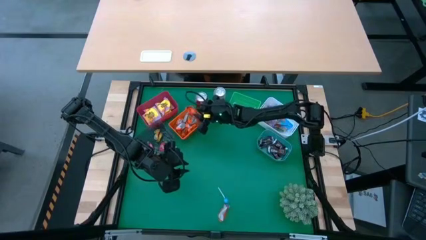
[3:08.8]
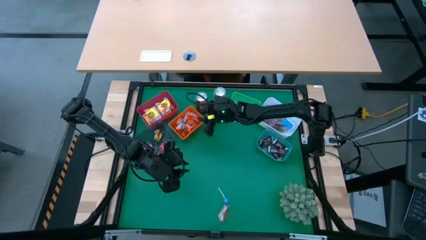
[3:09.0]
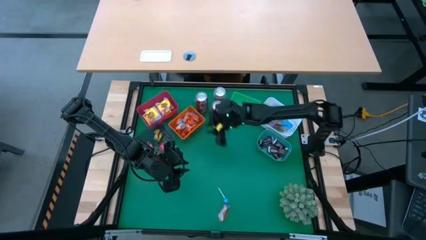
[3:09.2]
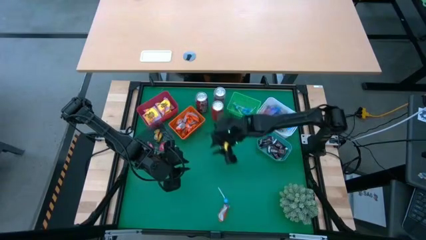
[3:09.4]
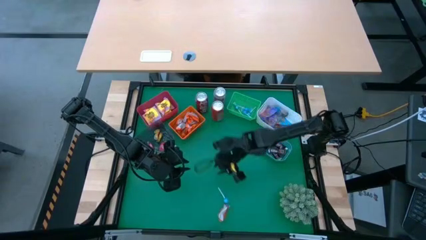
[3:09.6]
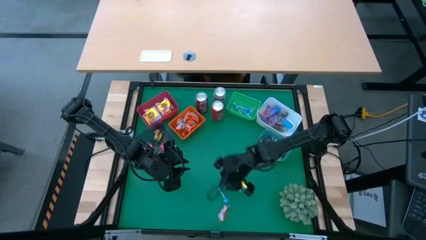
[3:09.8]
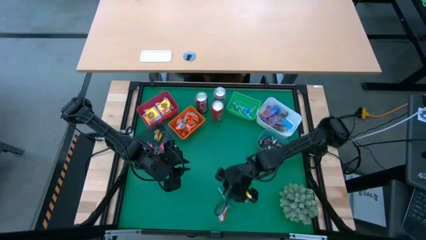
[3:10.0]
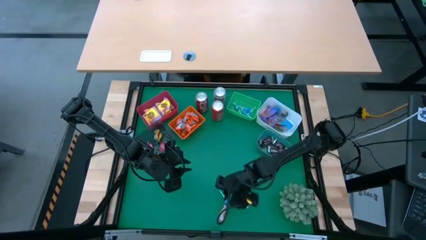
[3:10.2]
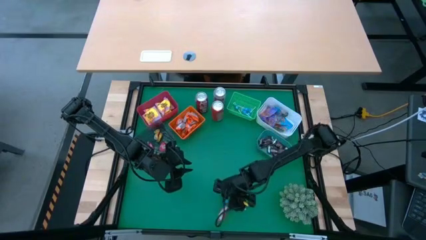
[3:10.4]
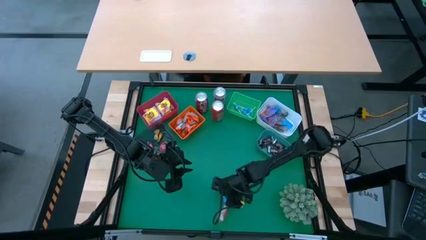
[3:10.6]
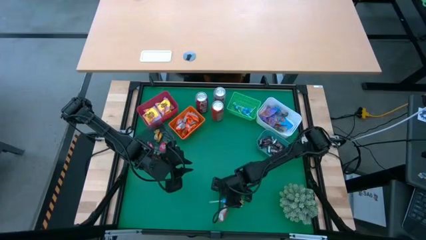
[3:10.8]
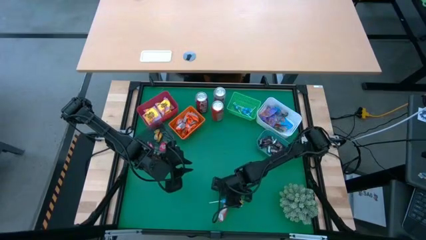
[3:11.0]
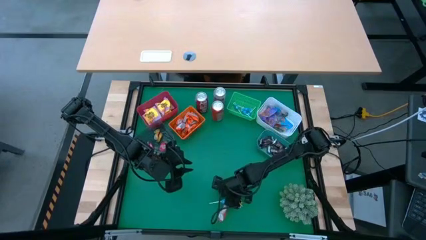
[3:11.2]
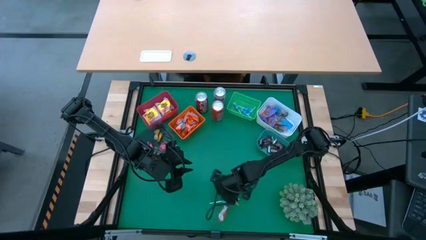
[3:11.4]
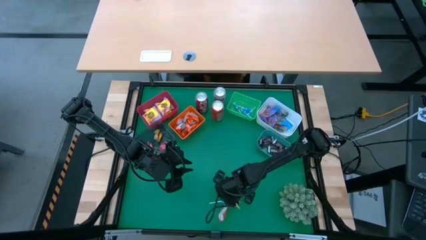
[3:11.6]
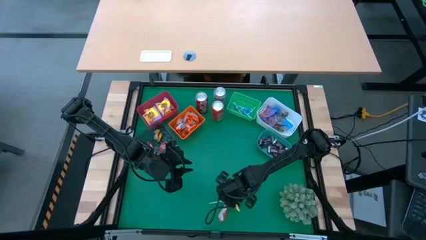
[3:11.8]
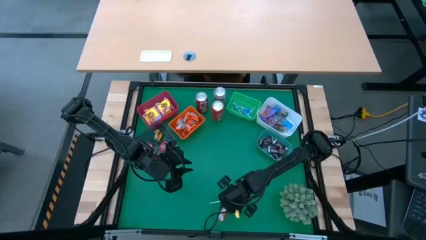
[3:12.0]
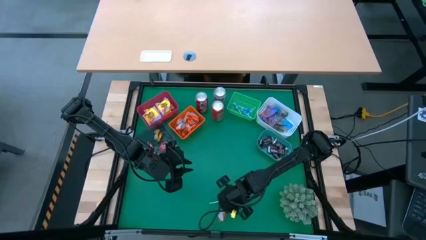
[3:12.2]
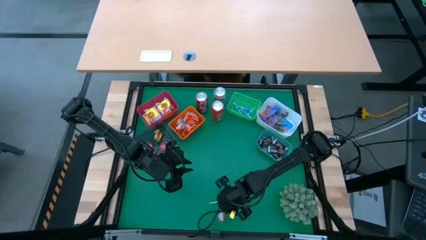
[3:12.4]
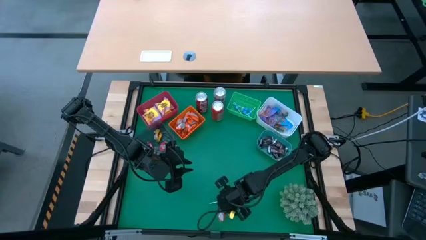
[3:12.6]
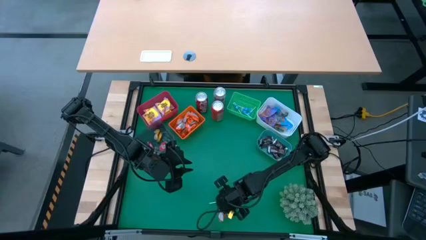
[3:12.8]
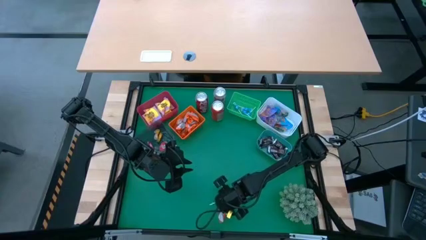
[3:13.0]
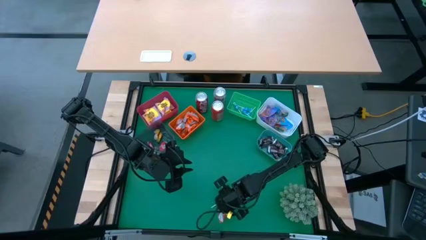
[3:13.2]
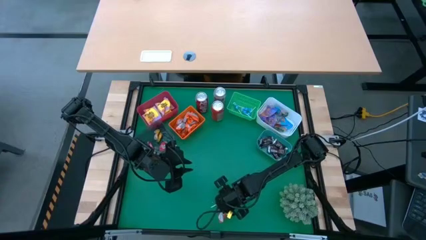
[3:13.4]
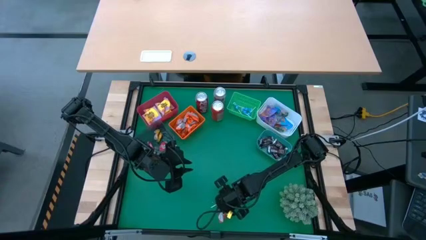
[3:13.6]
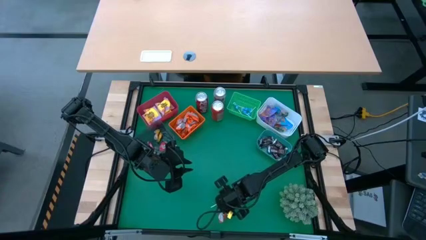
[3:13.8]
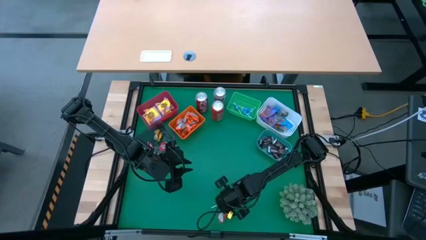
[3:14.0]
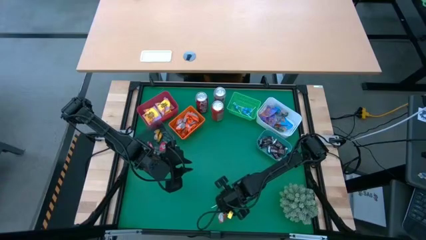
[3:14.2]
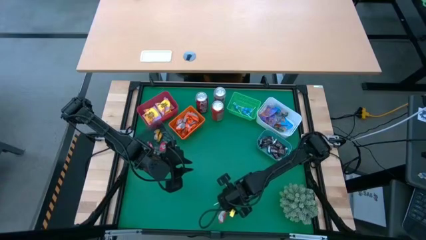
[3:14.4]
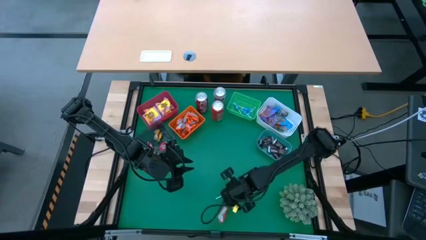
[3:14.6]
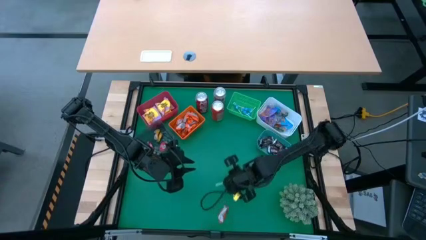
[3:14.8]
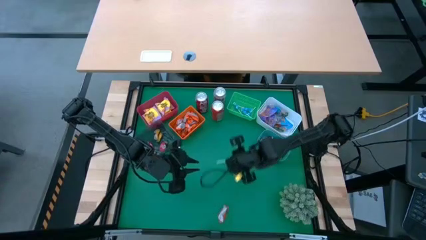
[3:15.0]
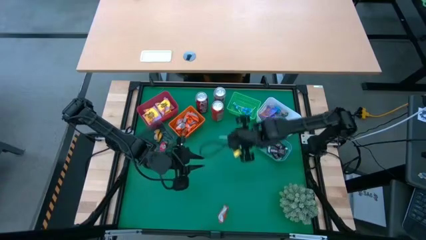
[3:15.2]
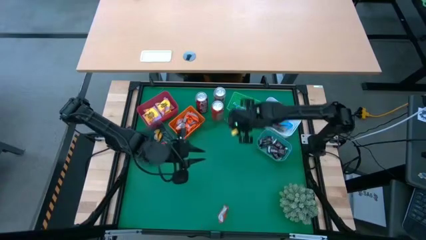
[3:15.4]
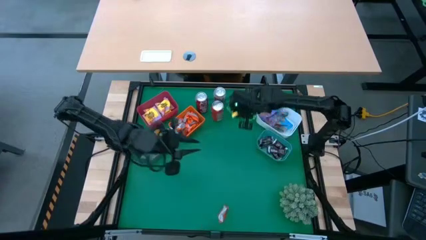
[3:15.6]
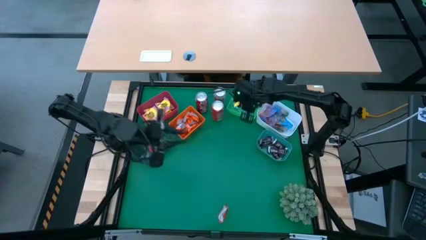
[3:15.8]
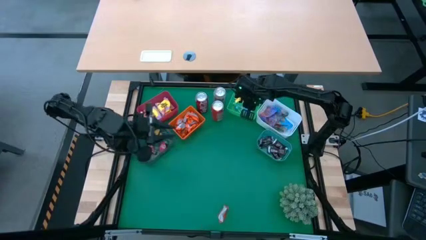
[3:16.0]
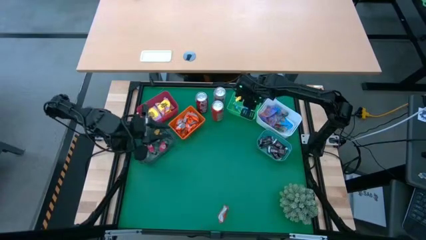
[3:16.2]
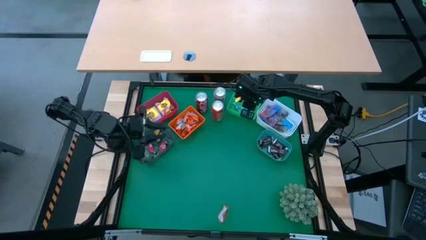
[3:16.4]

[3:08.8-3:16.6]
Task: Sort candy
Put the blue candy into the green bin

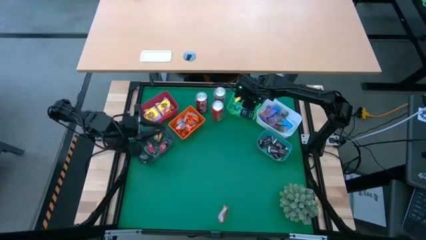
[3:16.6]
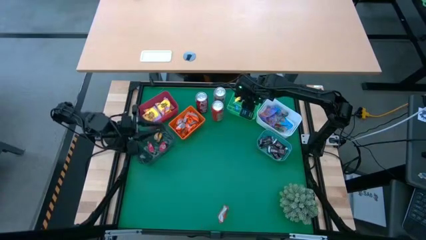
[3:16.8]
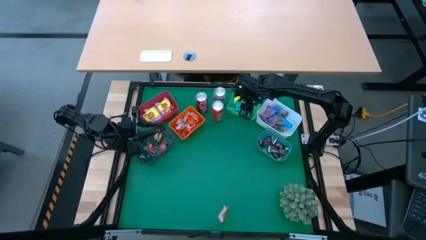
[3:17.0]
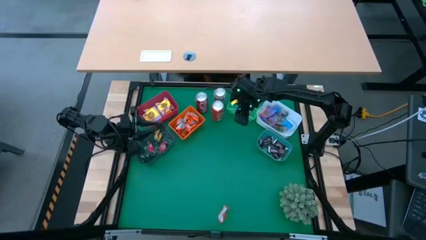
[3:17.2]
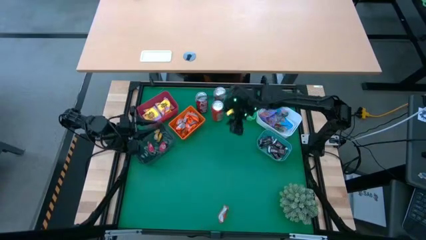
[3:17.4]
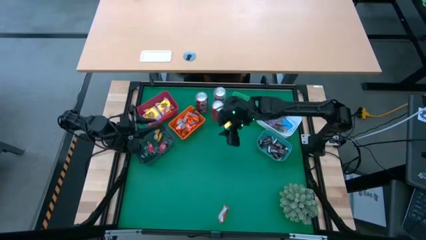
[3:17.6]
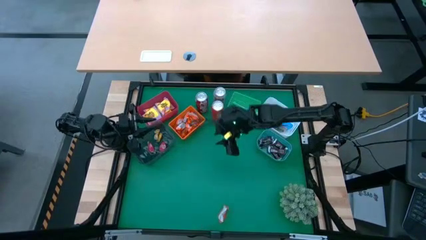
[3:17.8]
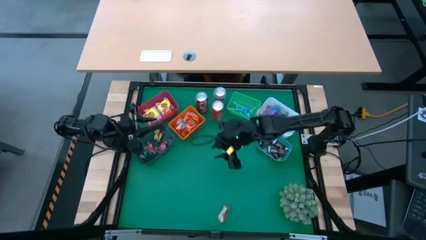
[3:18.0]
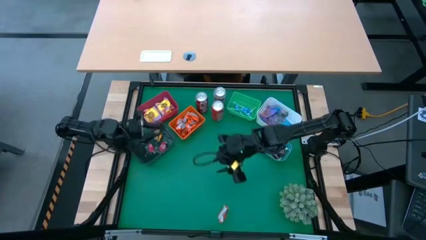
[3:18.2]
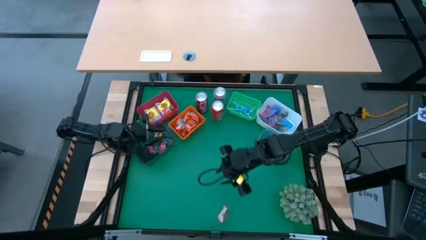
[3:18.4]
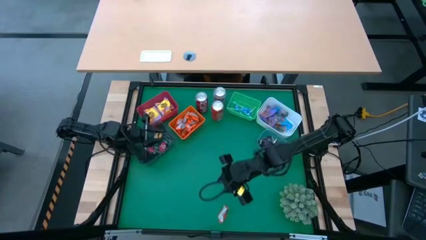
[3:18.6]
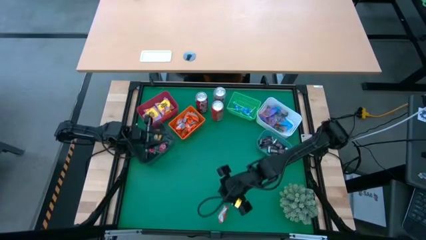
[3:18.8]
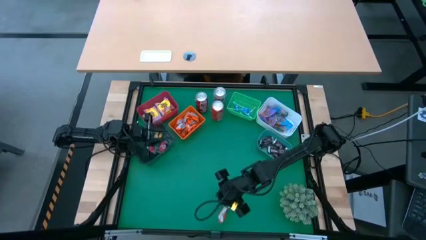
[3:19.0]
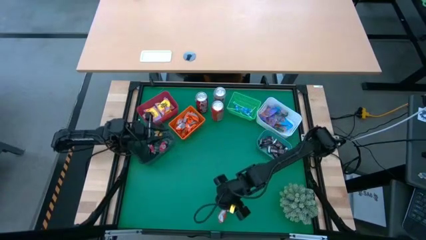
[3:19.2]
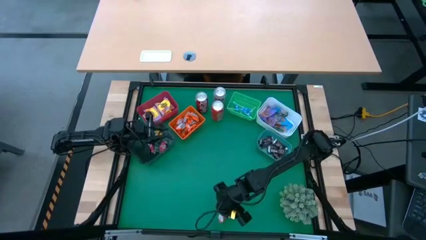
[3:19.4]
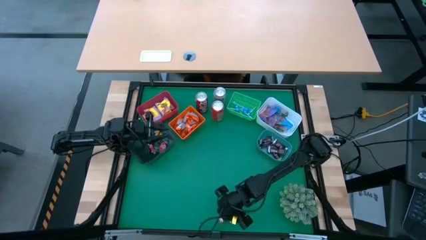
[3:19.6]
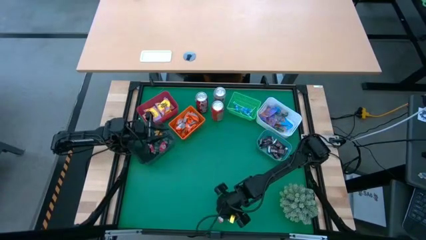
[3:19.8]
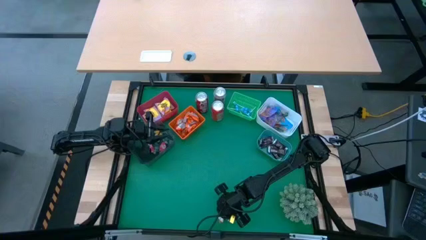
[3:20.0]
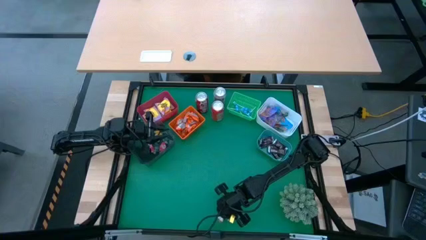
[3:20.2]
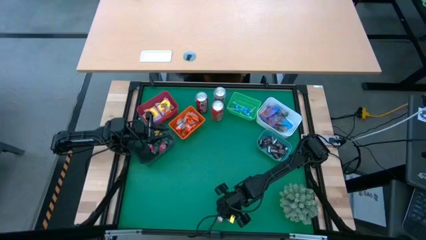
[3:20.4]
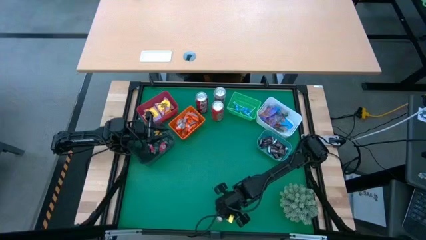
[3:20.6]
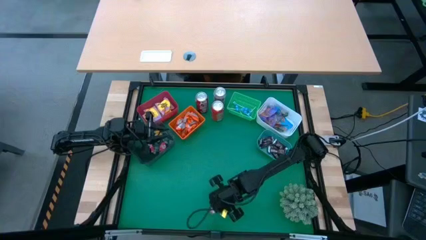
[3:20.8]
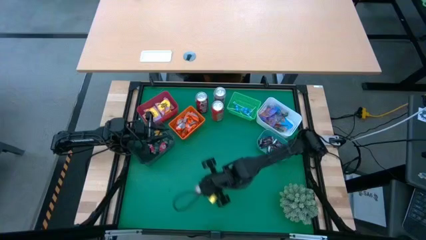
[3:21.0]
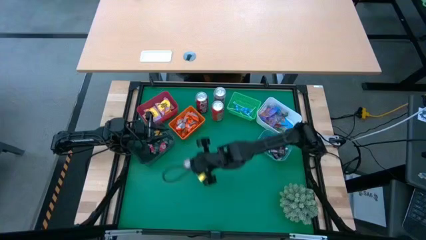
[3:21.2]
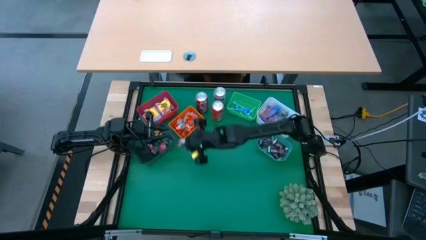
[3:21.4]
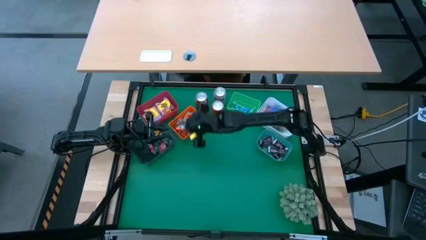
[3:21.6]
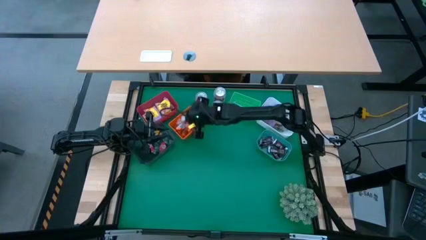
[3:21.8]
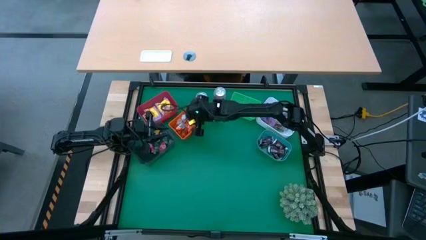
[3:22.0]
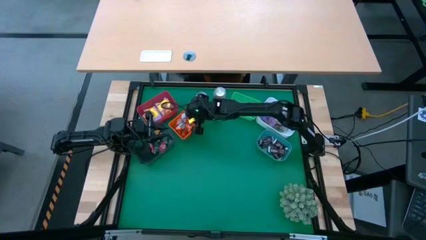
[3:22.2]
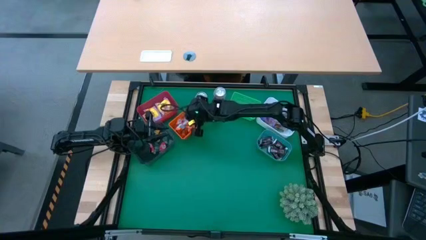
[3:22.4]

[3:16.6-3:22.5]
Put the orange chocolate into the orange bin

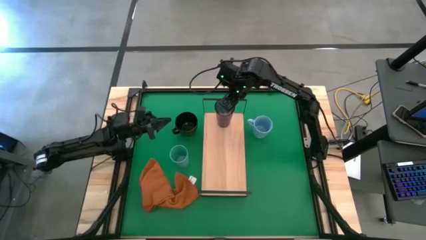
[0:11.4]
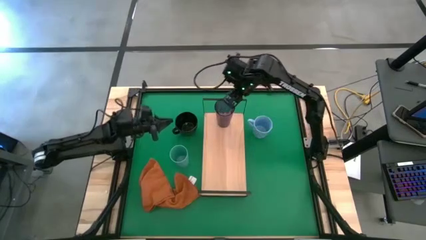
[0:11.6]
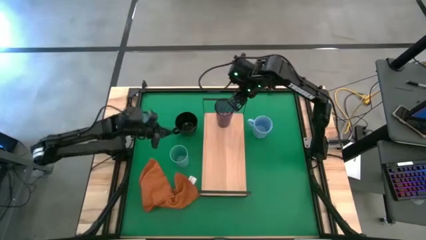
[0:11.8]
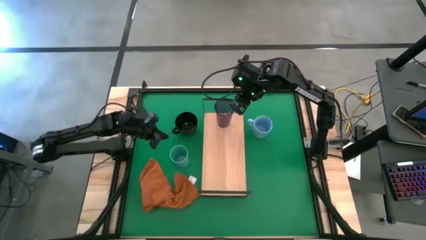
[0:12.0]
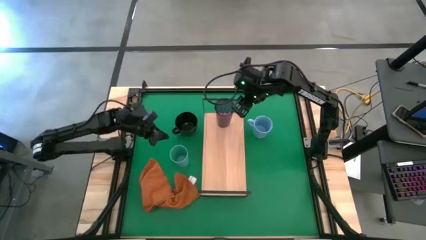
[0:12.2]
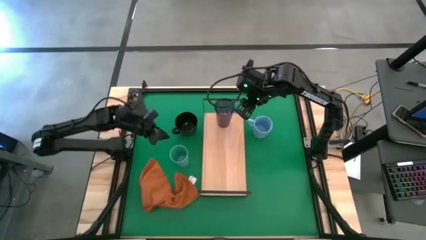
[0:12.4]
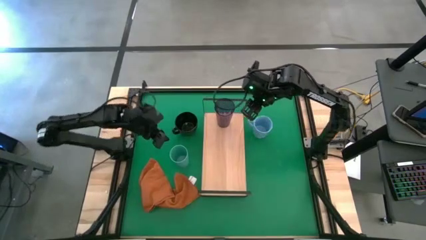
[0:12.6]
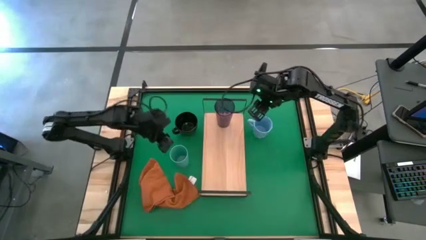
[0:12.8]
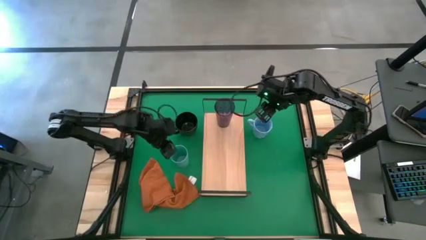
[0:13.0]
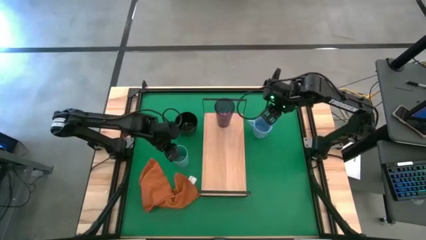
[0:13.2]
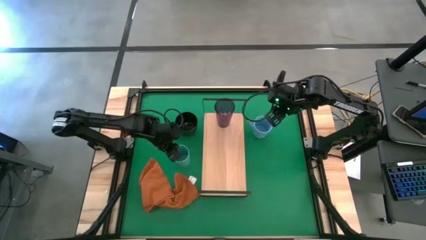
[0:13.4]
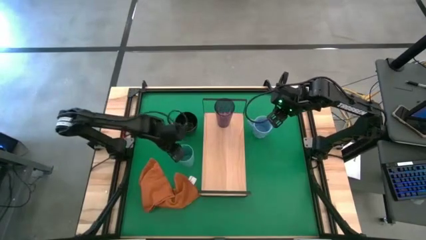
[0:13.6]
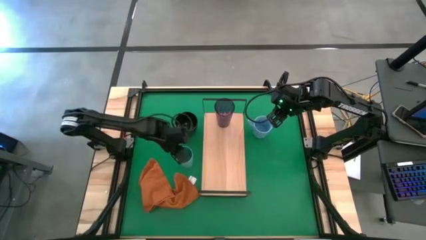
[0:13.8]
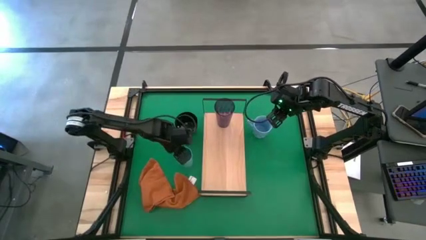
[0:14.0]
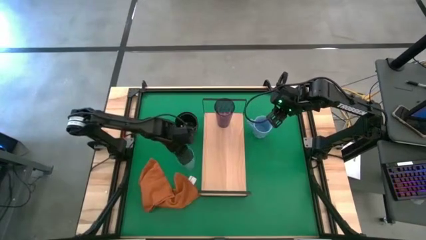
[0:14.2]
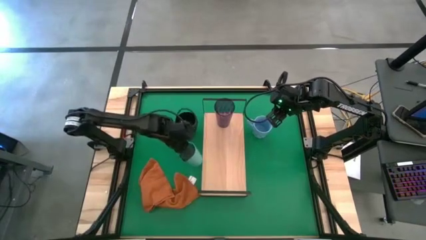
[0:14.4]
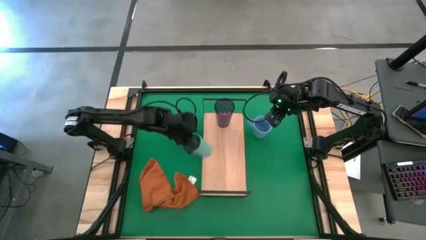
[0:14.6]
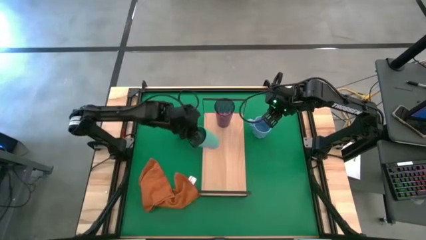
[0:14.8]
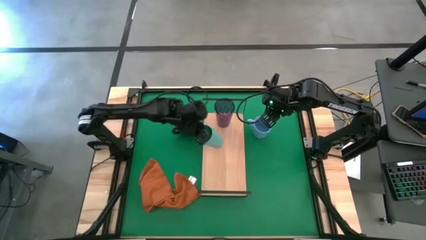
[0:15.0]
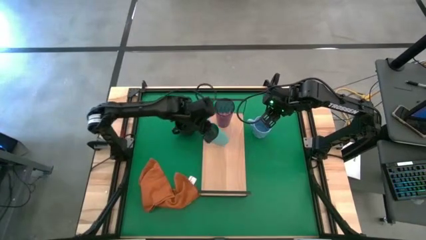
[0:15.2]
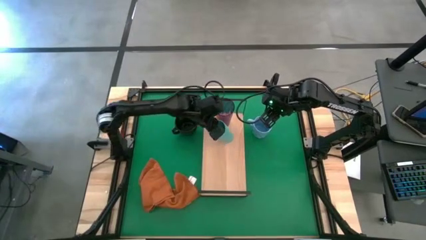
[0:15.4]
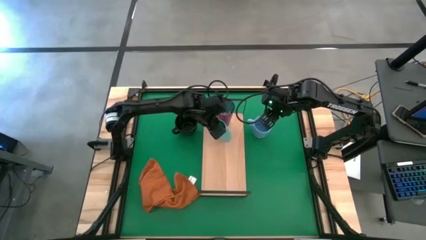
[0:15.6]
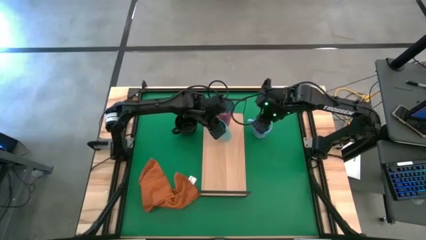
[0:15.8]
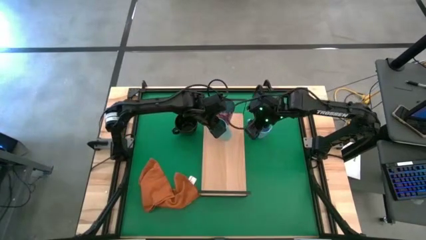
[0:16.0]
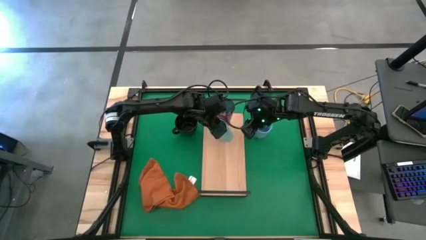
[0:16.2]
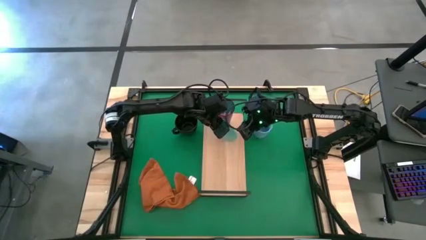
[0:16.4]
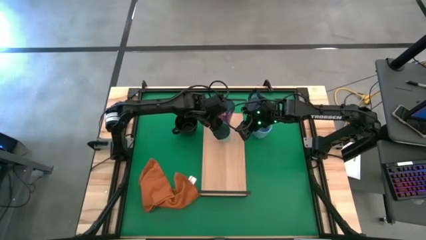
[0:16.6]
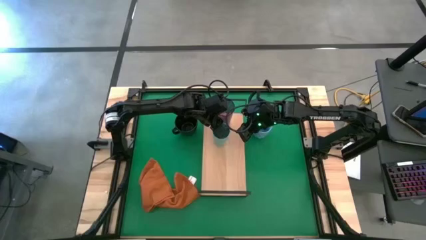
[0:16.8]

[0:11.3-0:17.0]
Task: Stack small to large cups/mugs on shelf
Put the green cup on the shelf
